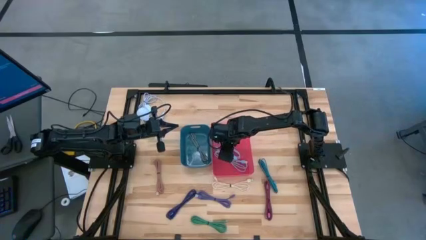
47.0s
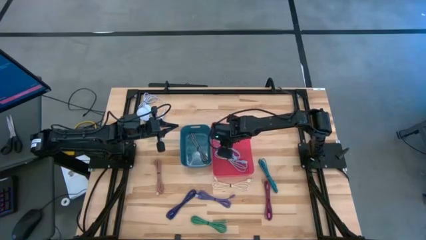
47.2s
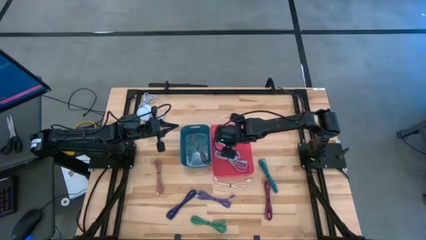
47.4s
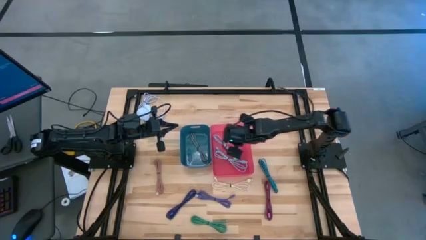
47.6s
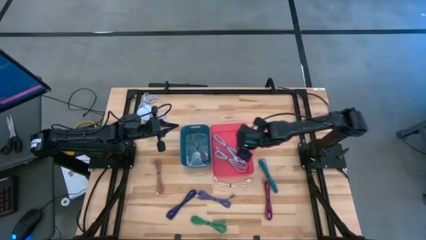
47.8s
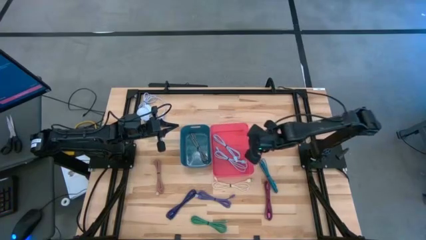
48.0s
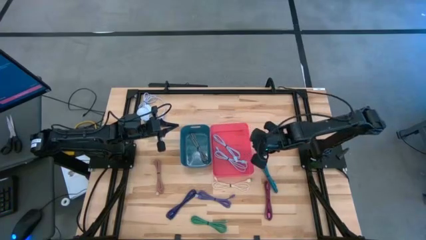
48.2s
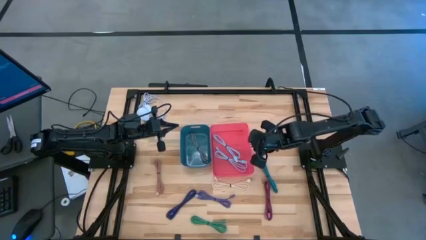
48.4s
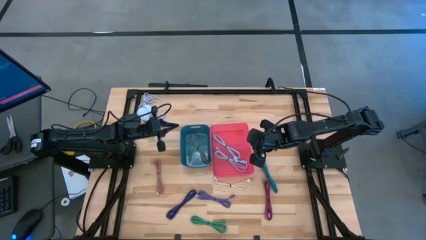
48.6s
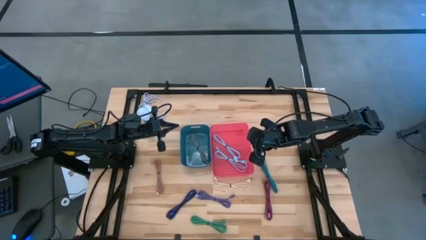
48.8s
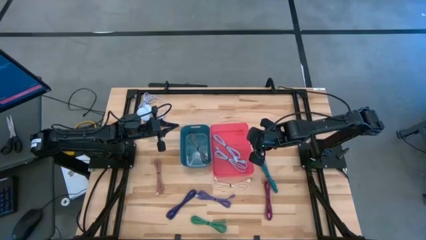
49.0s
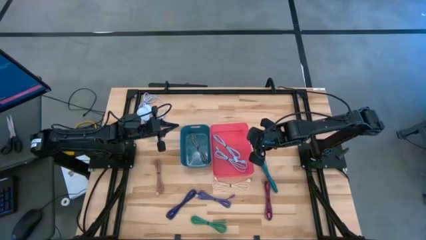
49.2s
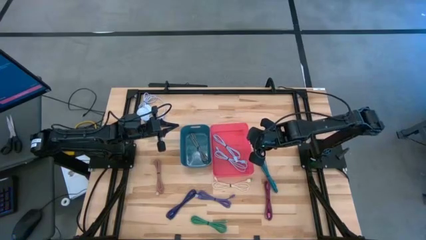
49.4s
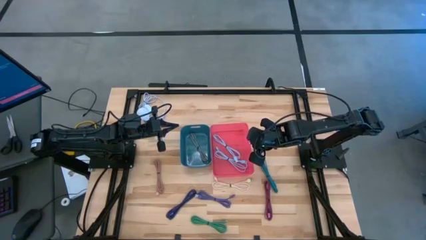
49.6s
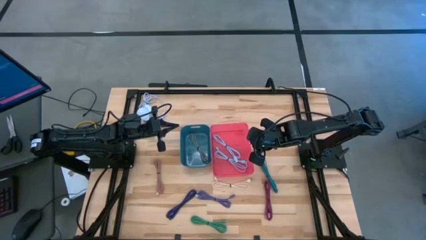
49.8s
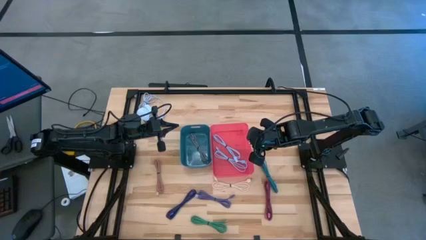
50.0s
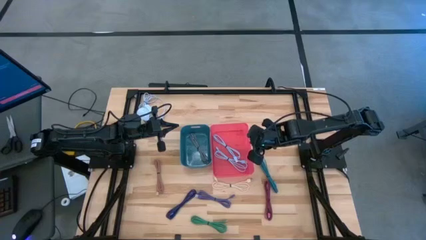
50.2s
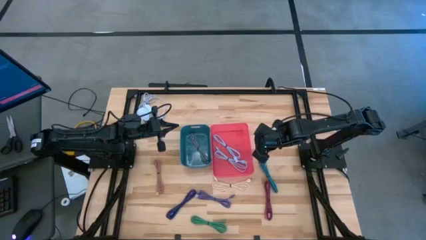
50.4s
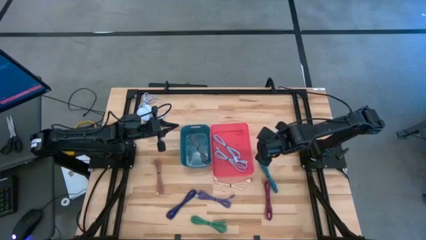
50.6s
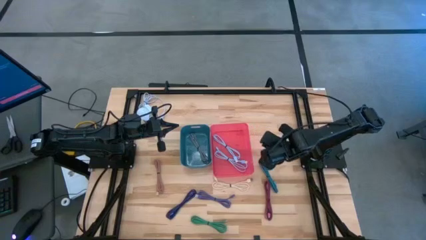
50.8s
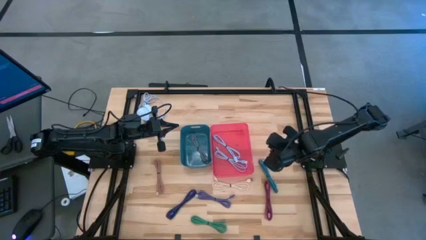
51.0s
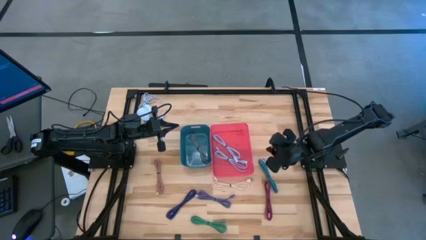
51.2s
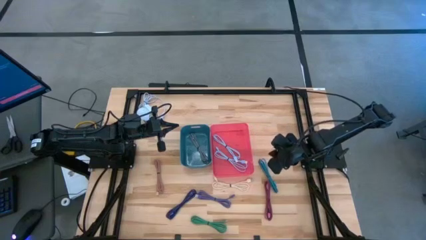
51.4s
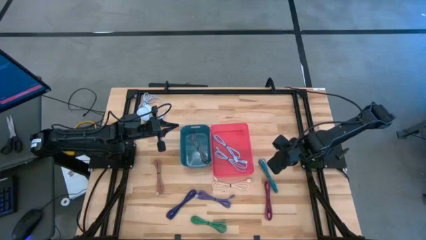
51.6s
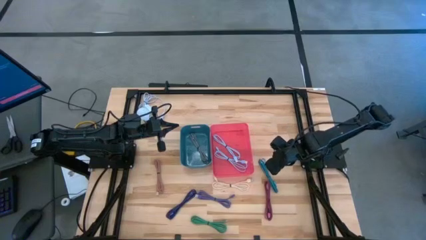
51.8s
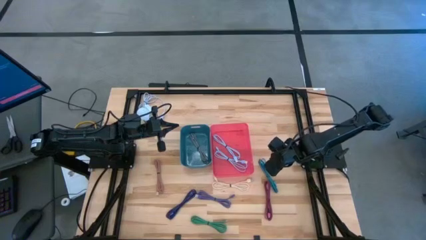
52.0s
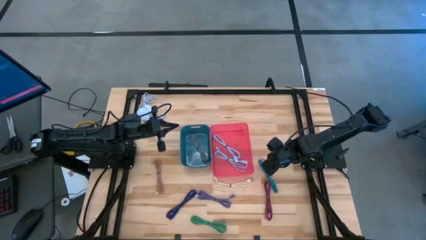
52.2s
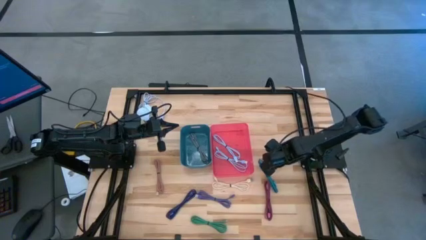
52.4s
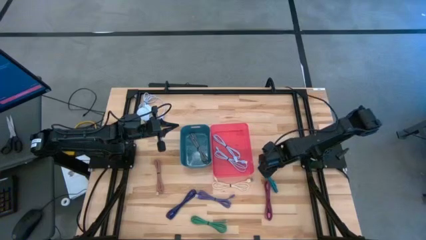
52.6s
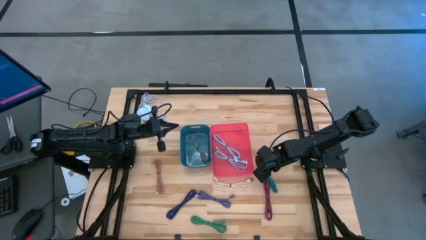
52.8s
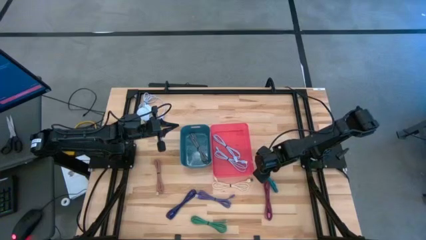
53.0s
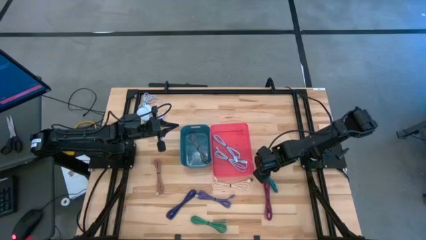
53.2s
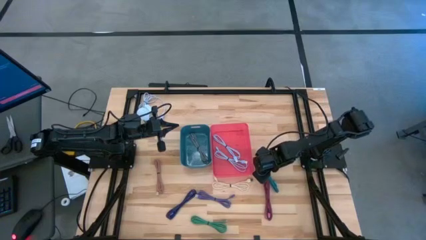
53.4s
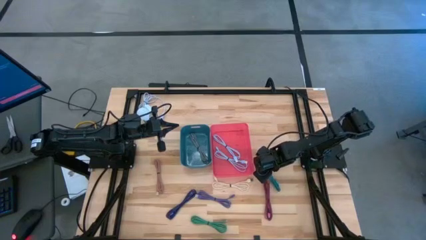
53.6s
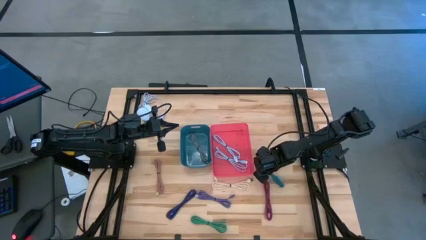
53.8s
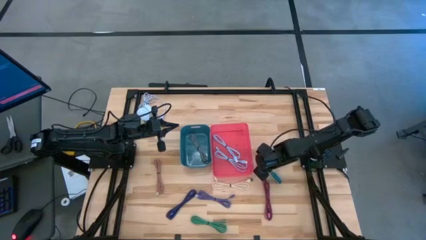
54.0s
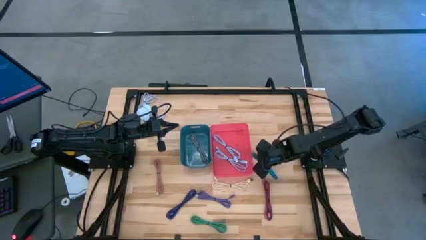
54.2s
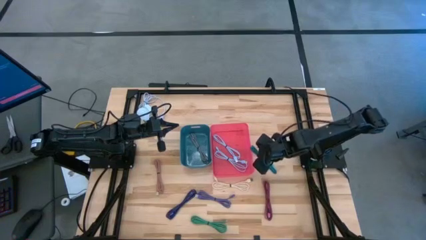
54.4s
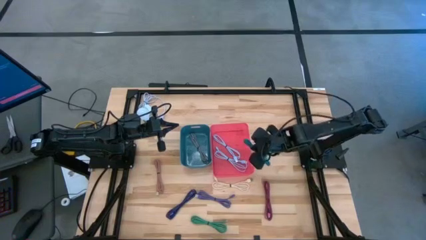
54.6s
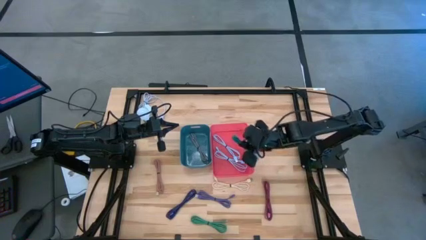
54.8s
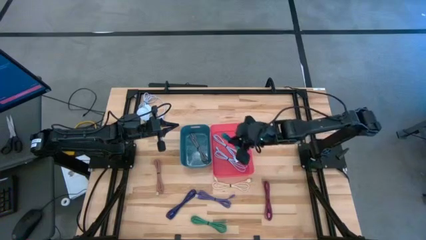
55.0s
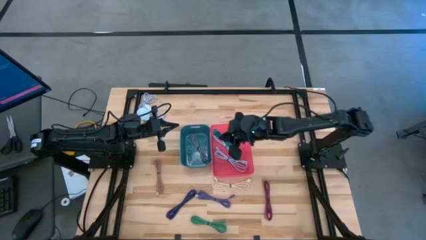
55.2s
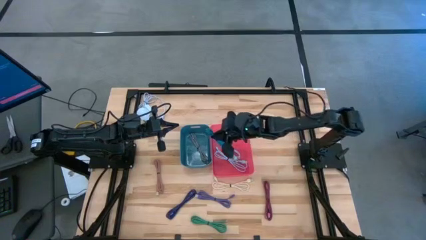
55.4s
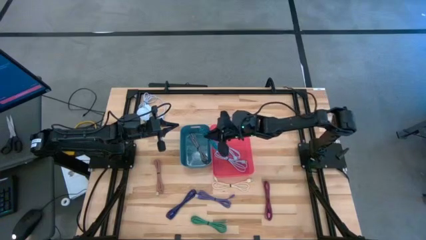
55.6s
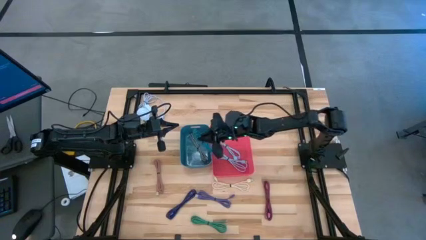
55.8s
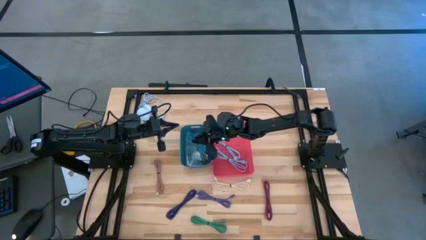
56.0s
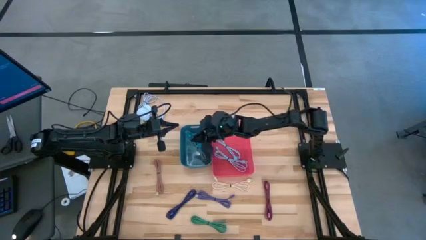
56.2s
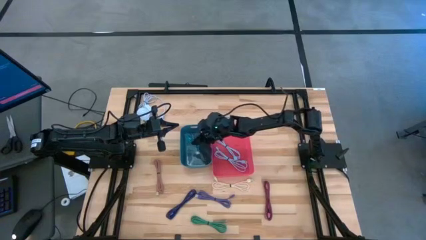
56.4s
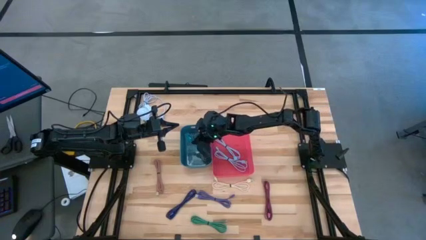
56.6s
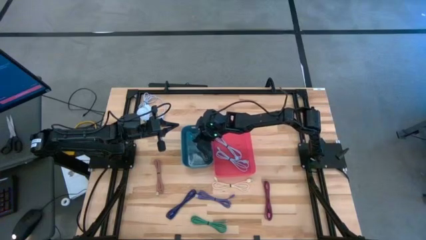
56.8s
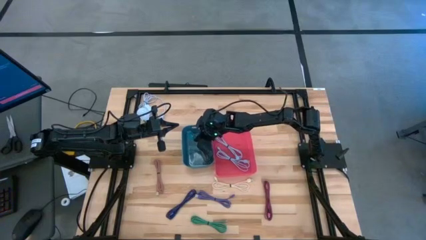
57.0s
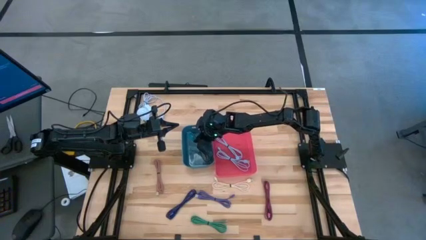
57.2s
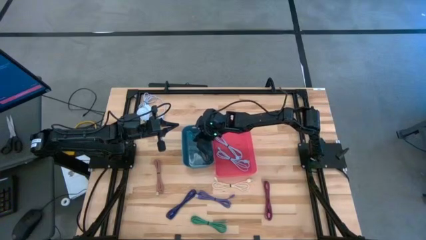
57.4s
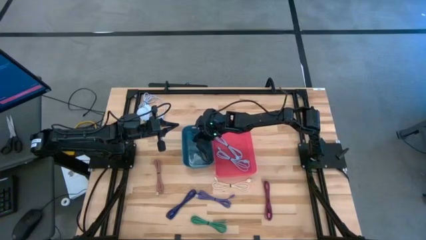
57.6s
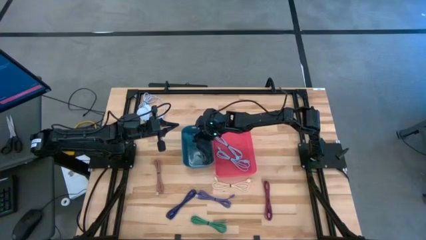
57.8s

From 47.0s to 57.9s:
Task: Pick & Place USB Port
Put the patterned blue charger cable into the blue bin

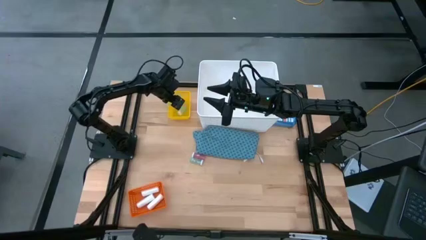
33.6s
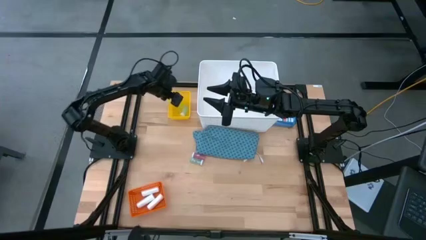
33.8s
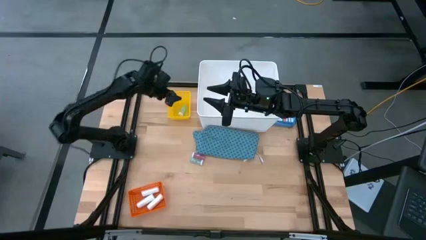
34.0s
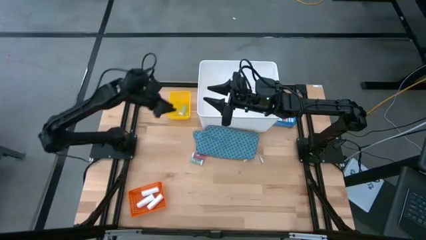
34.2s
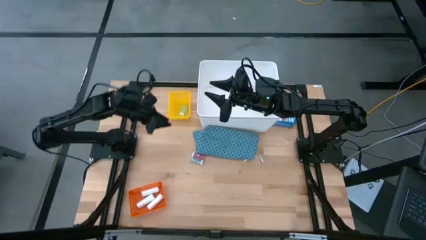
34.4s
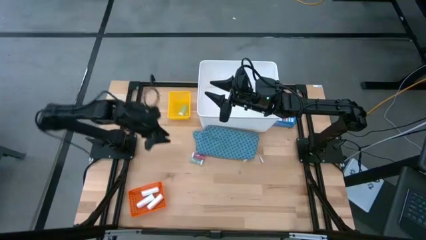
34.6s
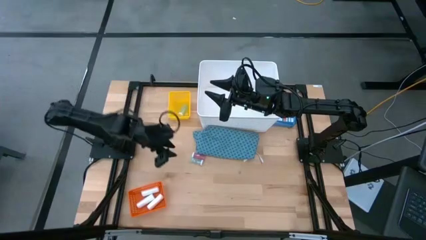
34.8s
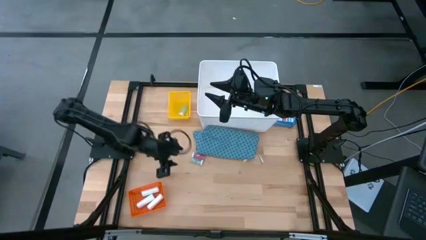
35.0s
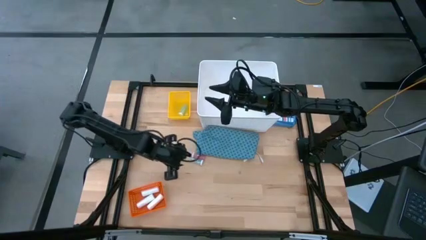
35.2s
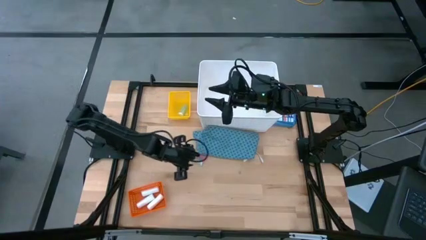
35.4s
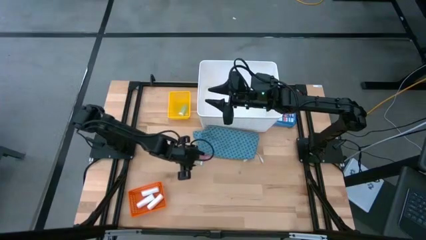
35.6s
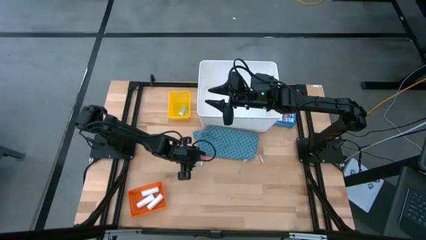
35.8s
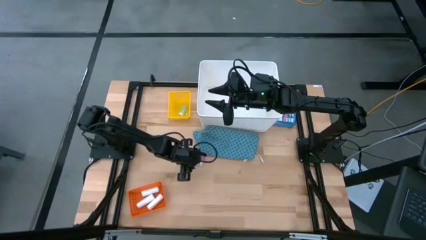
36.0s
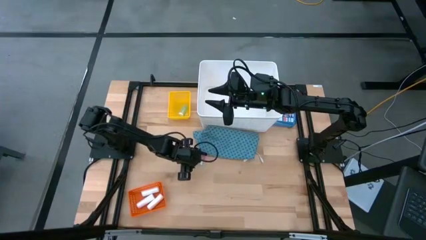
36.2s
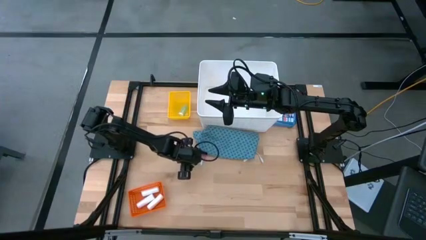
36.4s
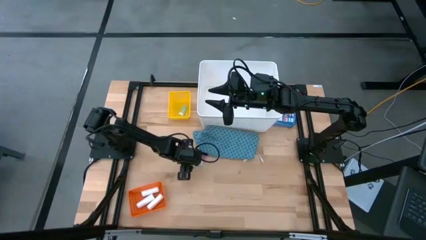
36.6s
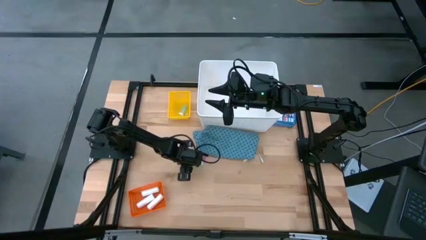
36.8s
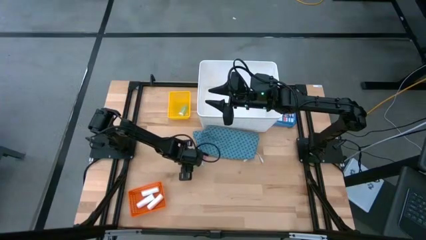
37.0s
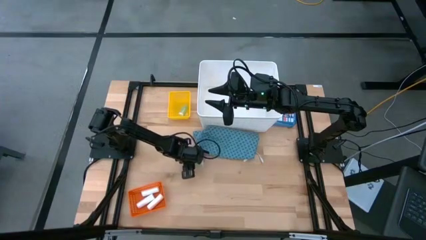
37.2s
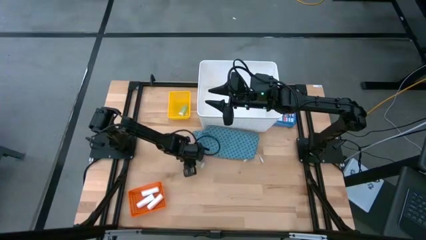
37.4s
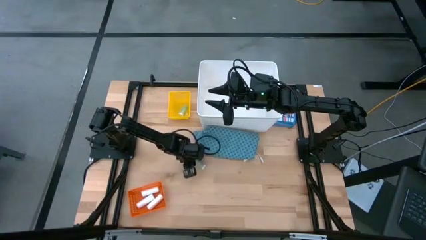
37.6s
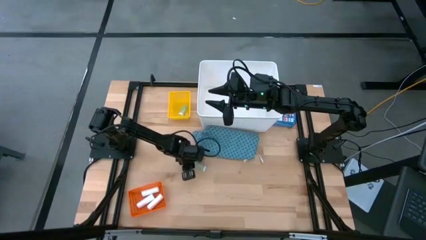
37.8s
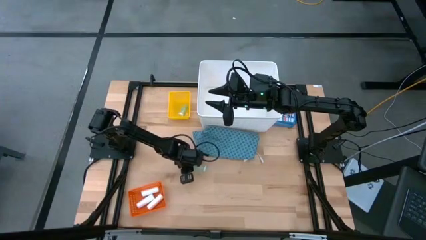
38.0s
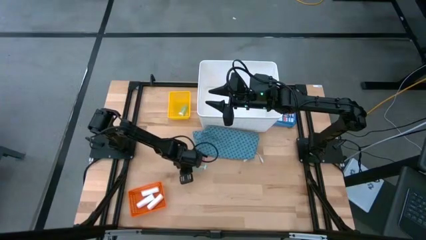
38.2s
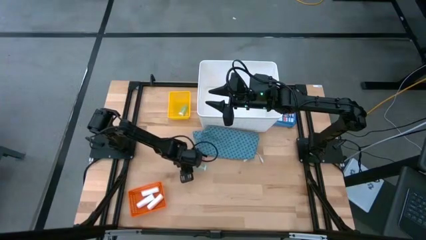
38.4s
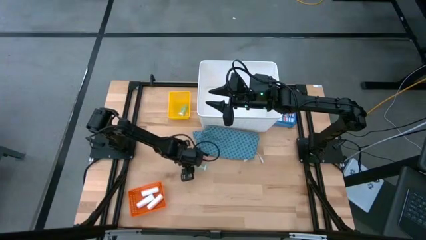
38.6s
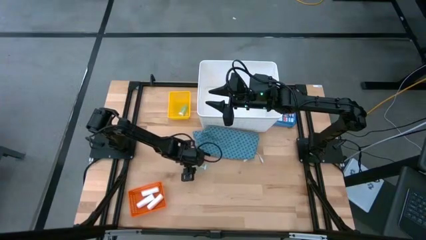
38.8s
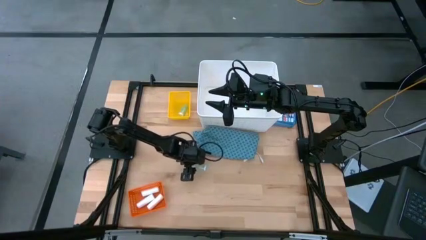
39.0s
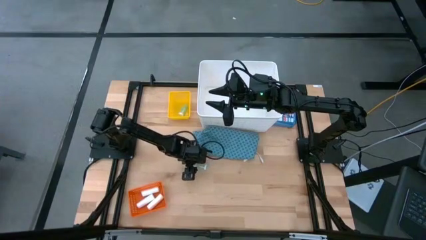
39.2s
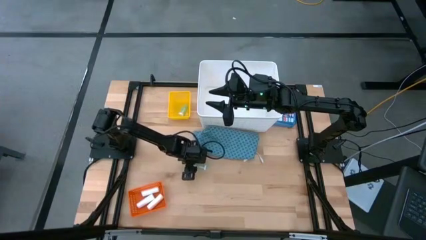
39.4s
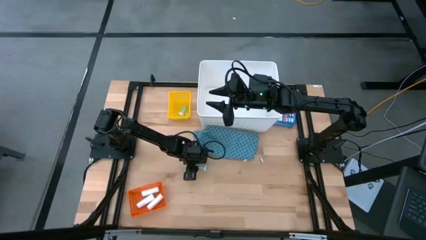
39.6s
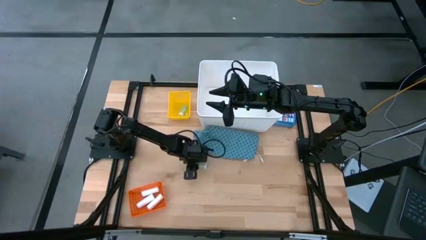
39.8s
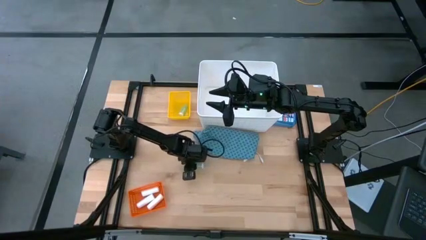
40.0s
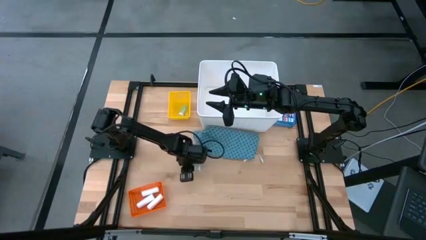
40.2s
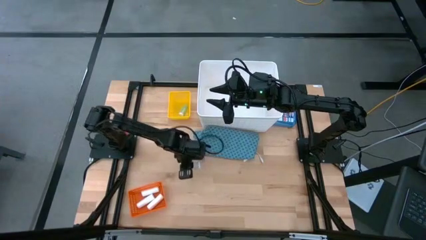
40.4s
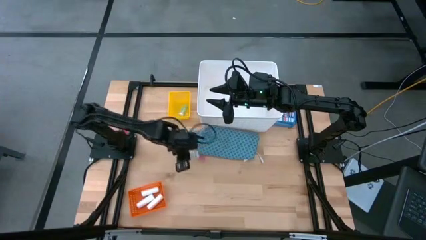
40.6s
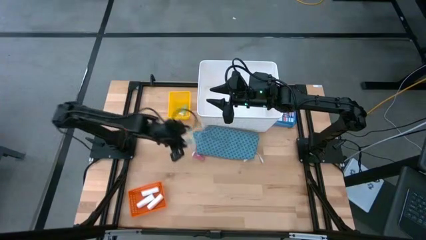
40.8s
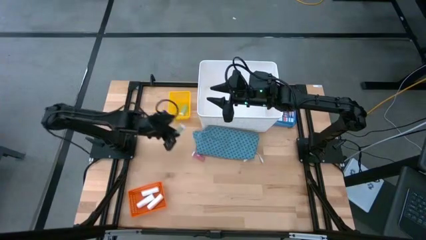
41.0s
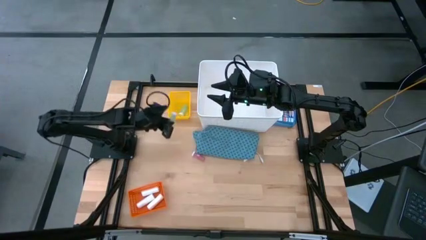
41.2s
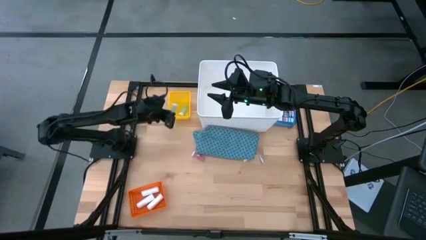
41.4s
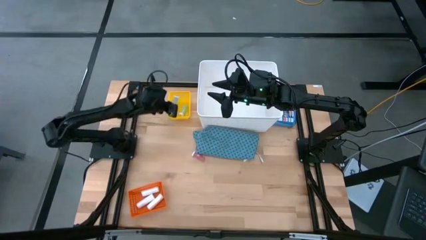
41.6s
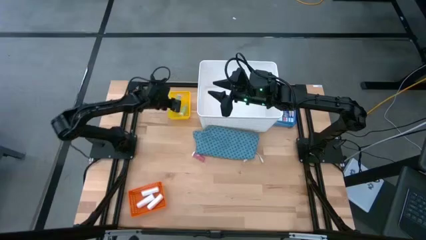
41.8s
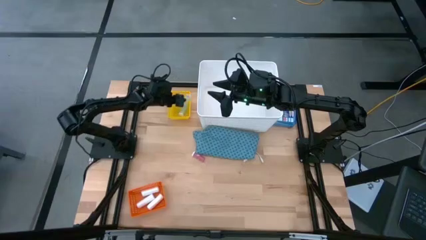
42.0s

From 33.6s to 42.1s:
Task: Pick & place medical supplies in basket/bin
Put the light green bottle into the yellow bin
